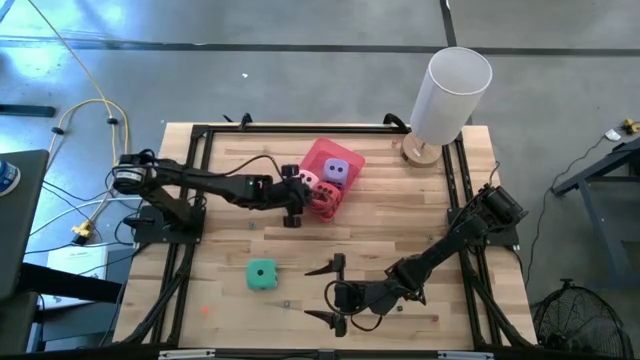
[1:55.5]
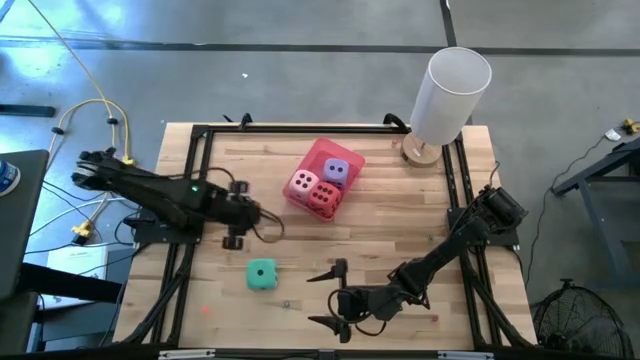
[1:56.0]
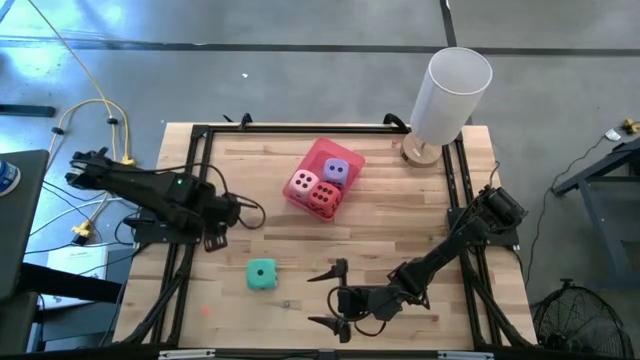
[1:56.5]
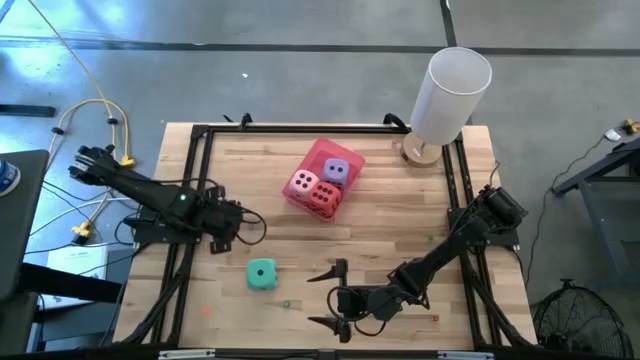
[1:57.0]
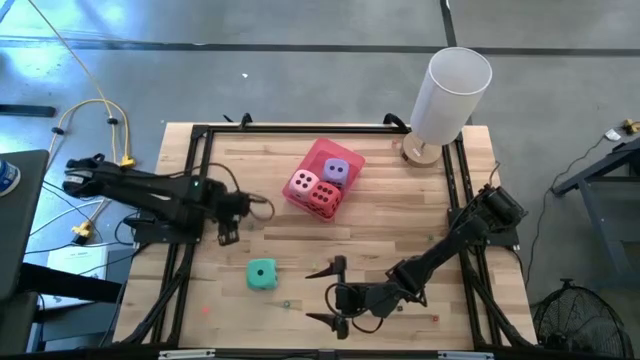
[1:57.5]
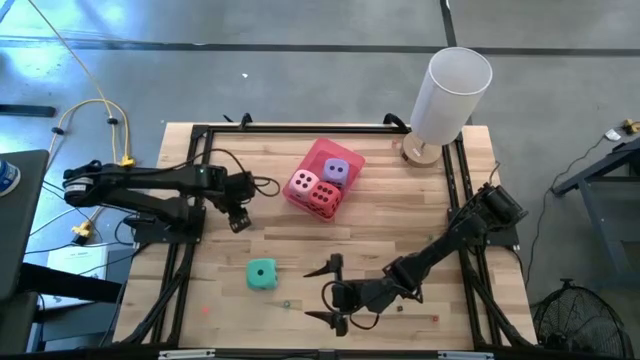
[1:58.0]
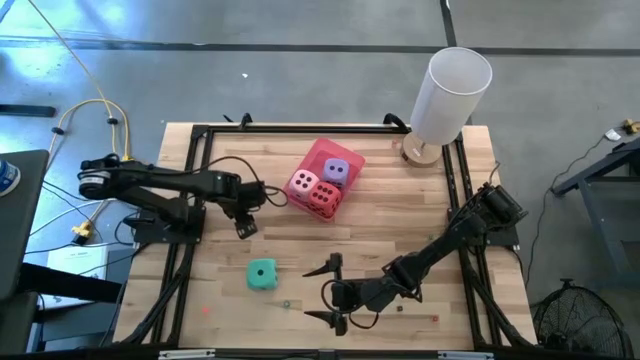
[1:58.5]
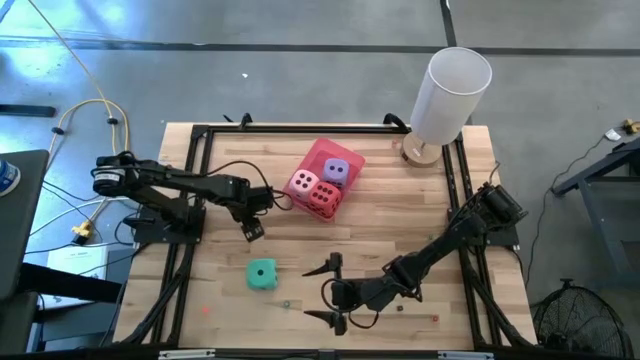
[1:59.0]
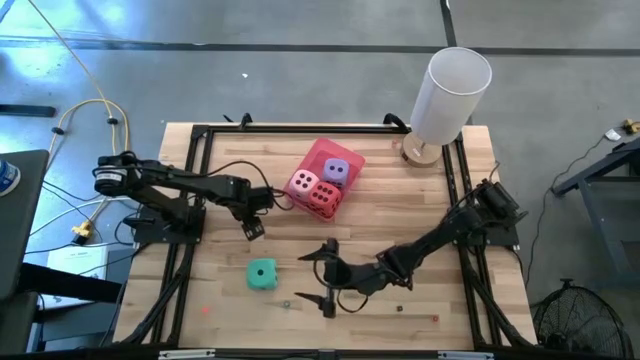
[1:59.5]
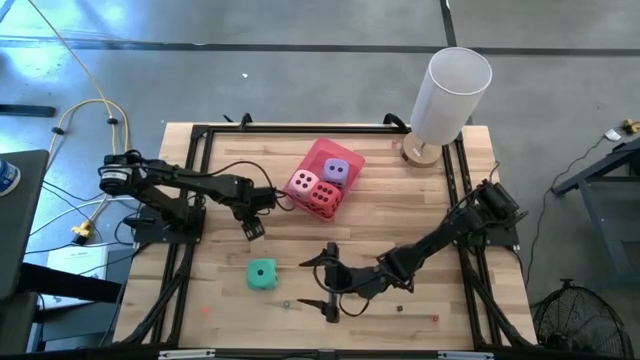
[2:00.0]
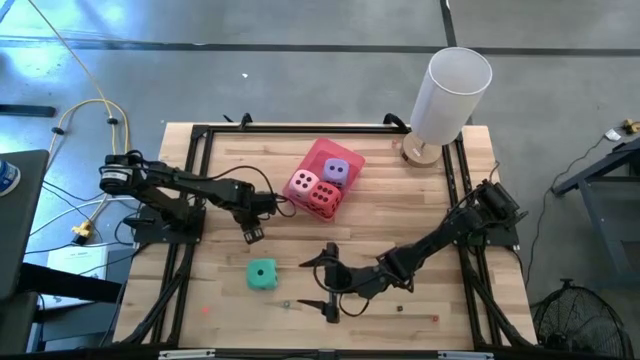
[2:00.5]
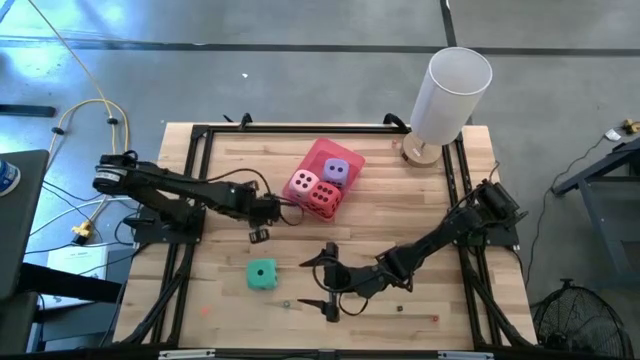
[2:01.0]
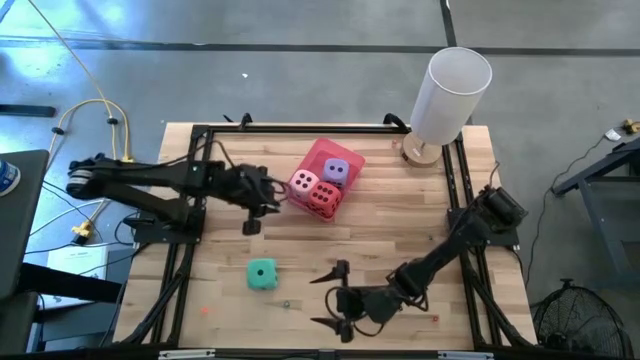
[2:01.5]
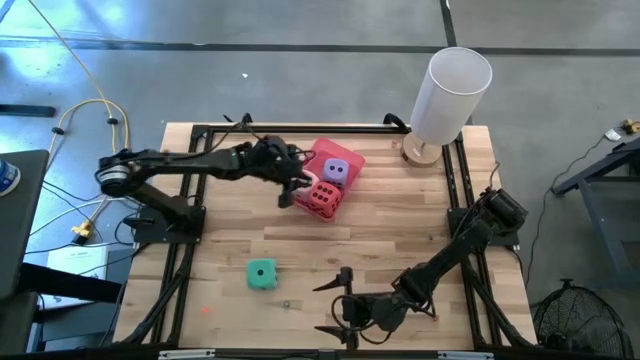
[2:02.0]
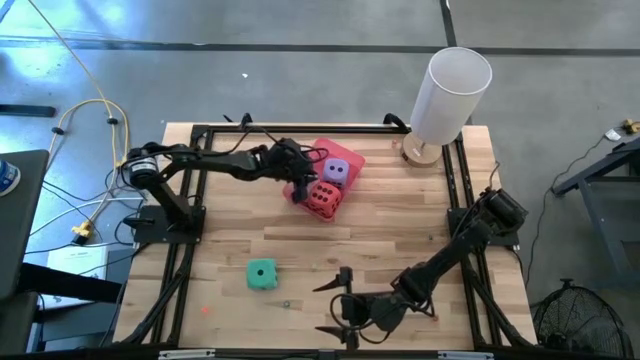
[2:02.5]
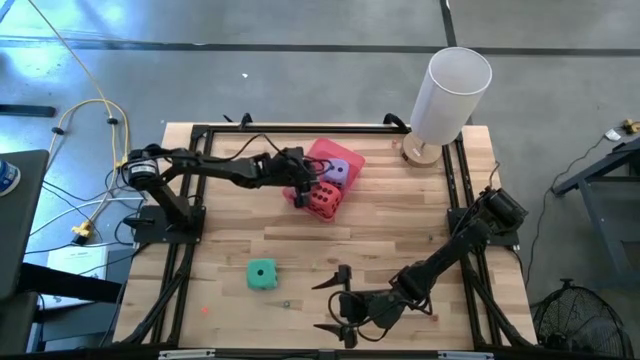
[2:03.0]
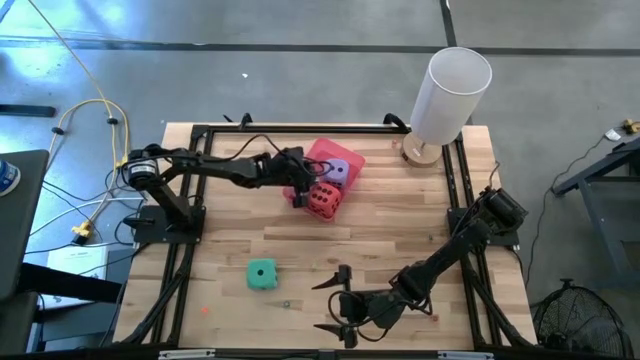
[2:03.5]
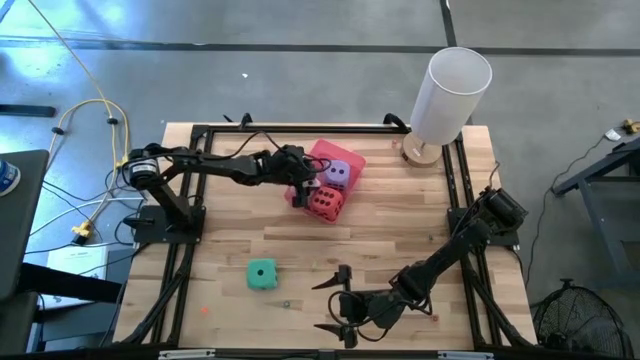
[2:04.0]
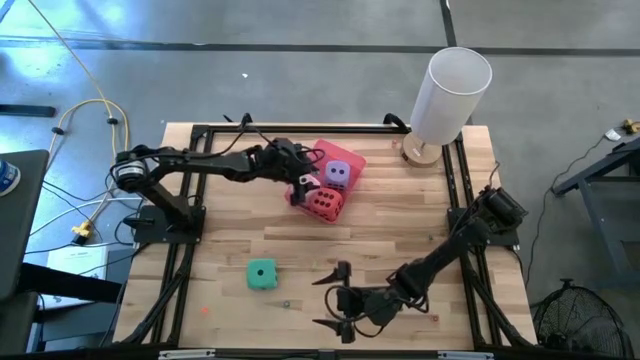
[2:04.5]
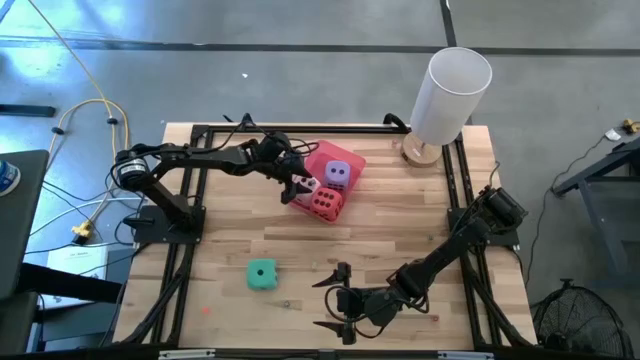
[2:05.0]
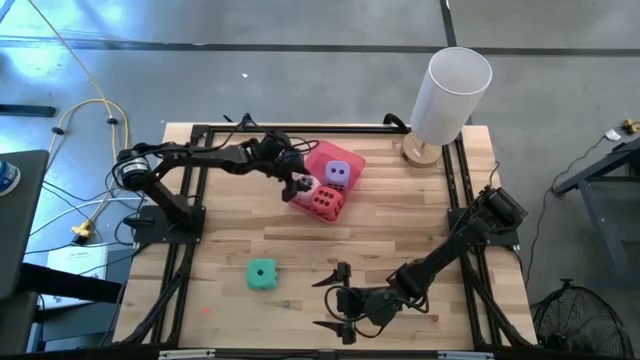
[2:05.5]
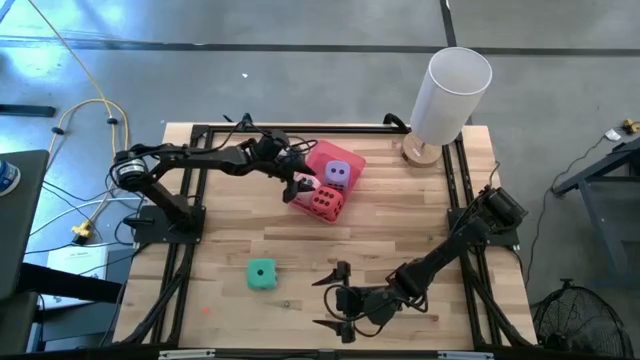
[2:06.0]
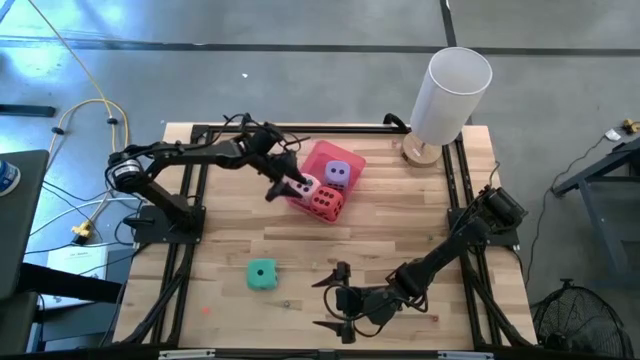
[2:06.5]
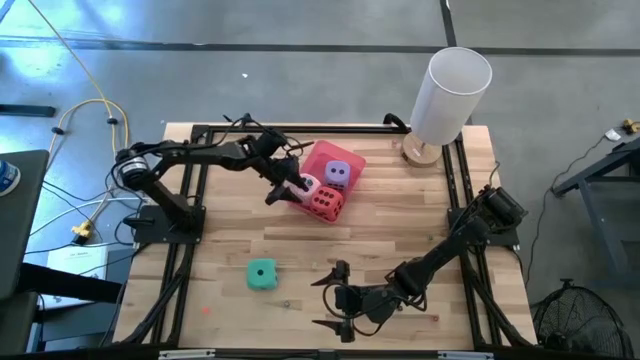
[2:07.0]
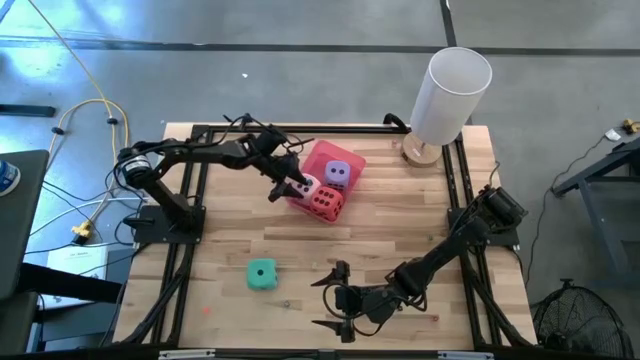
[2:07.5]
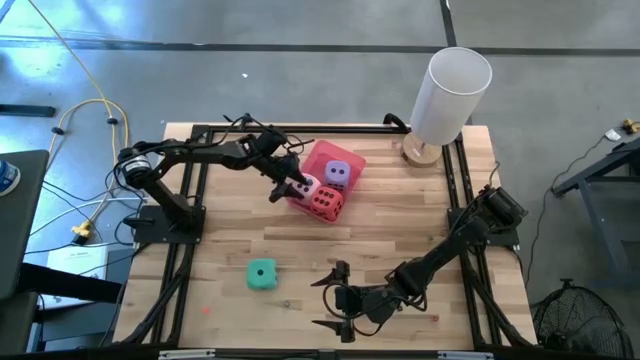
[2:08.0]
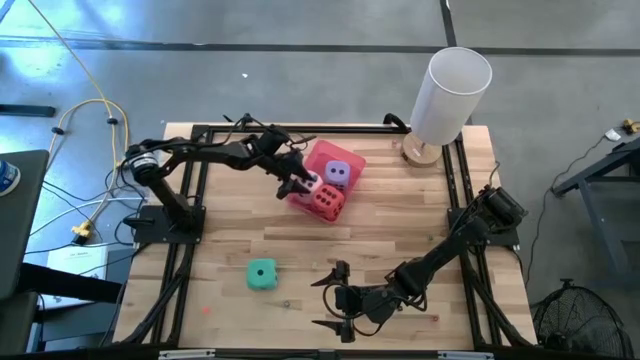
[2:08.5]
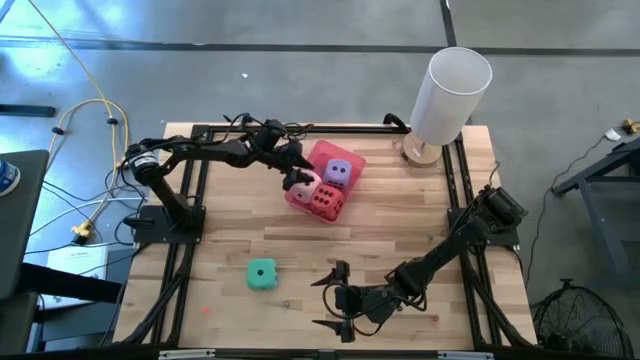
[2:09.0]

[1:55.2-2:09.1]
Task: Pick & Place Dice
Put the small light blue die into the red bin

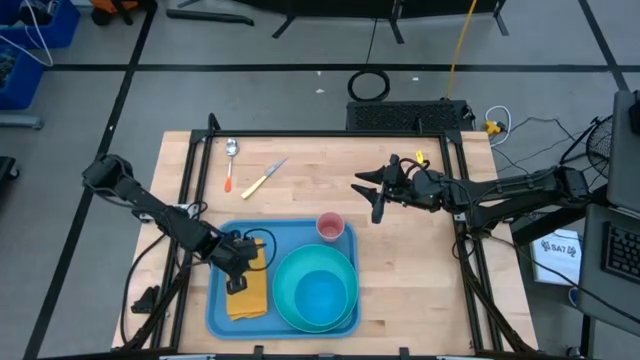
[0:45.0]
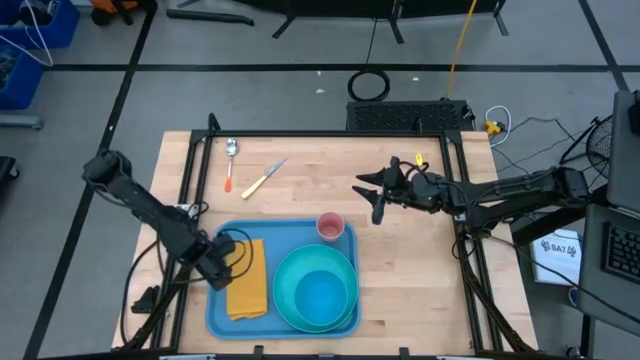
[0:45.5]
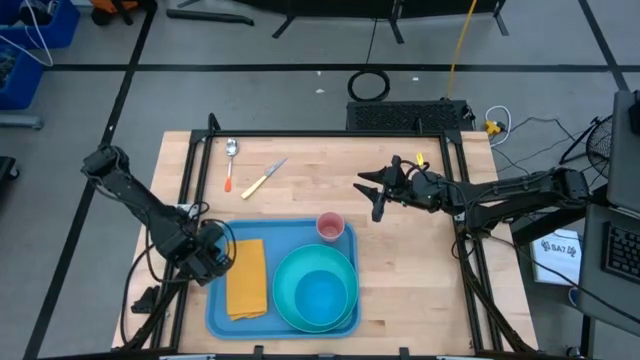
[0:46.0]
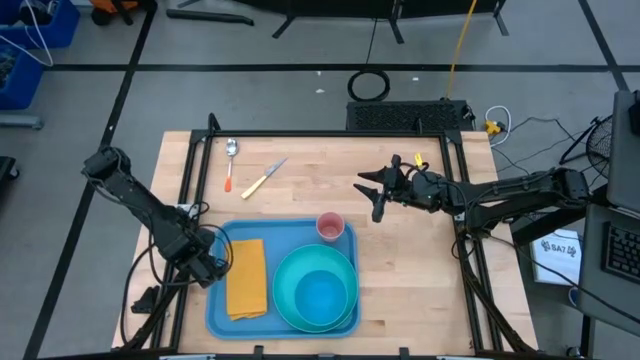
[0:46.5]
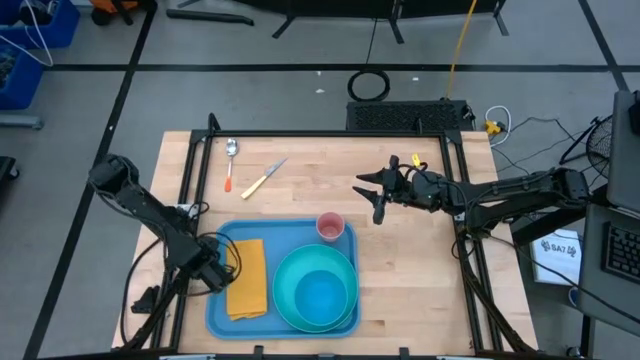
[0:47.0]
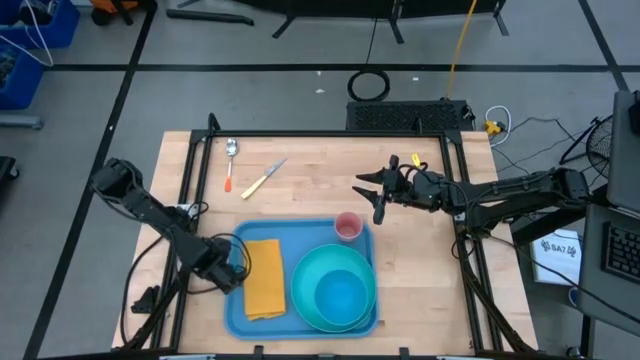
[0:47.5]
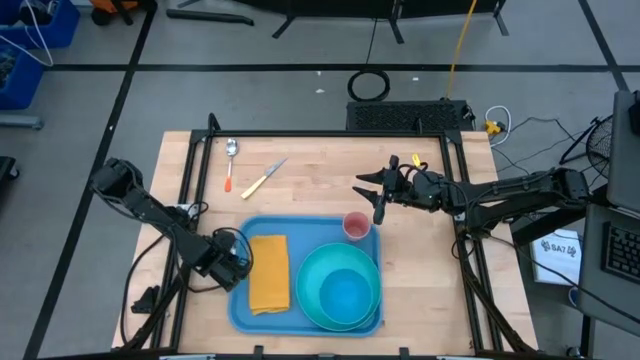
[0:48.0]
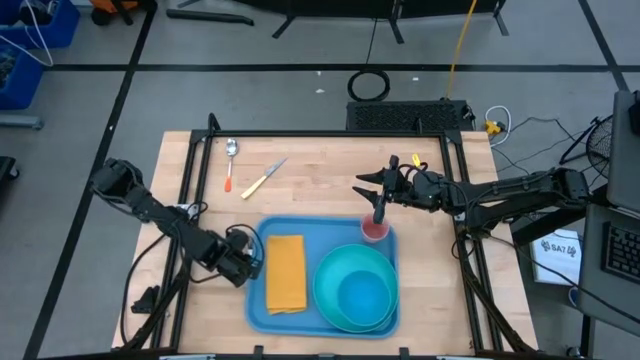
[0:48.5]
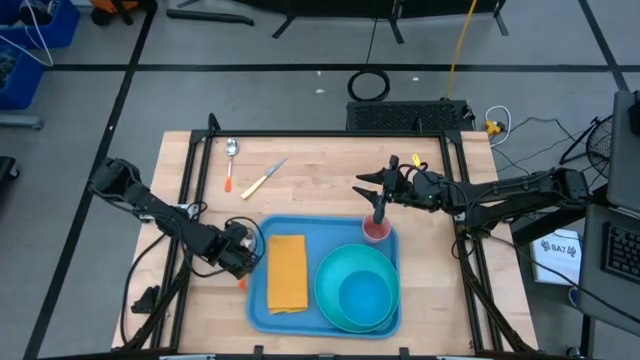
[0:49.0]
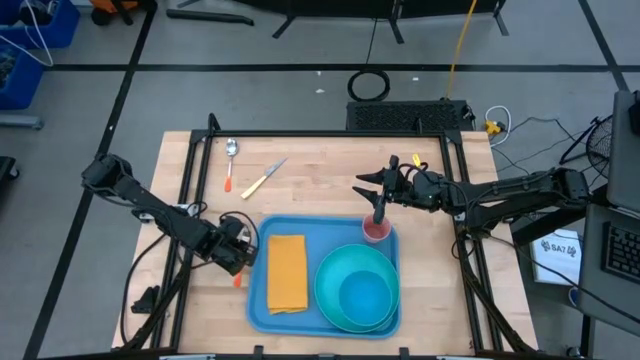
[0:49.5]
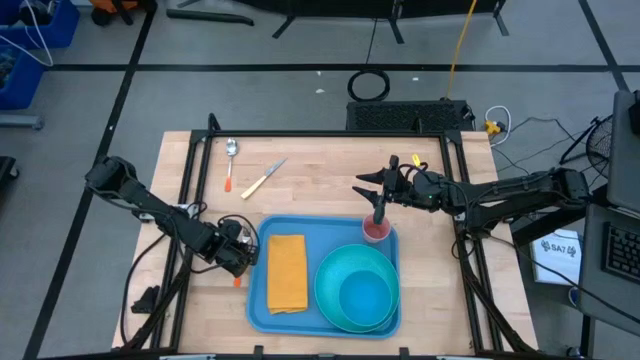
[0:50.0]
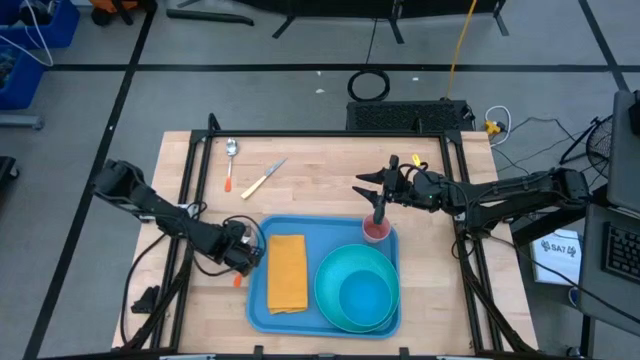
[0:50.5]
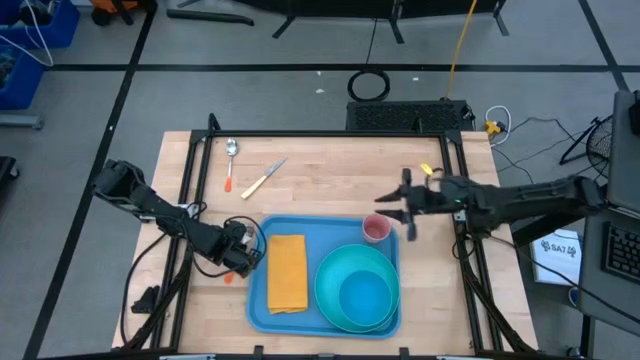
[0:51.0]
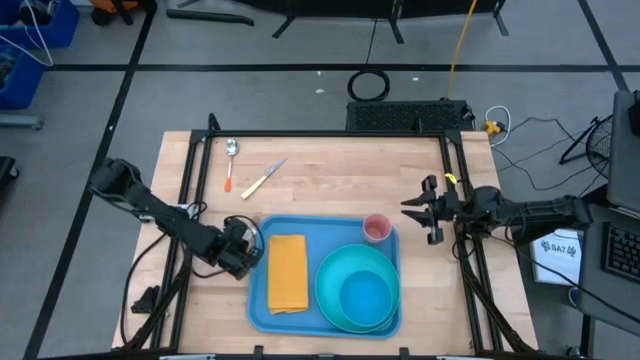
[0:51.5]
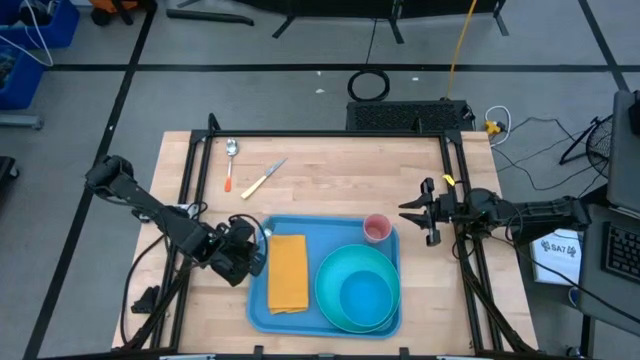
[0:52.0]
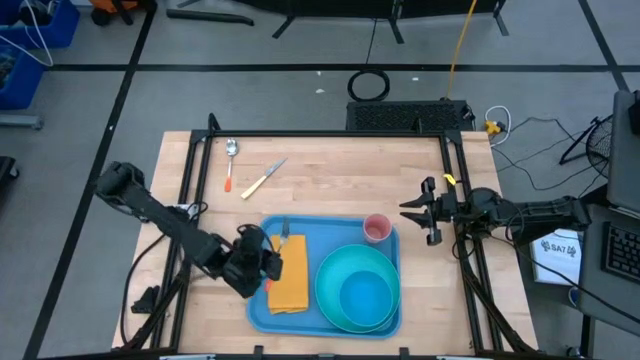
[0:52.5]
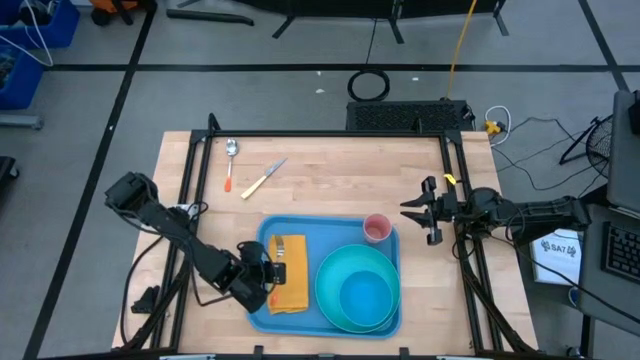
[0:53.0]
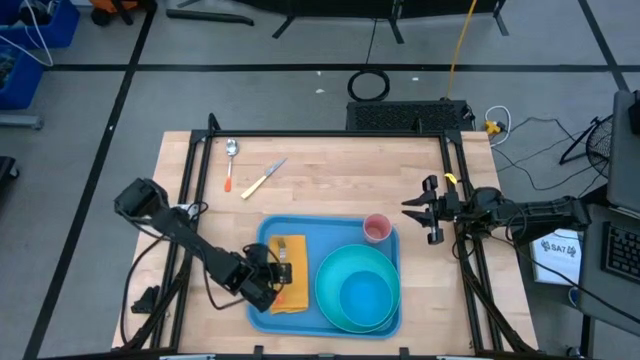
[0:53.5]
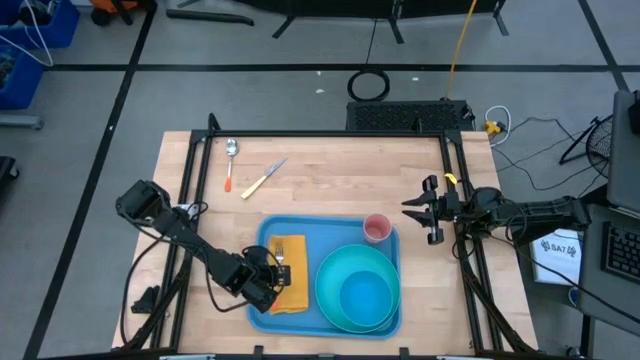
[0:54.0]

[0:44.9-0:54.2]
Task: Set up tray
Put the orange fork on the yellow napkin
